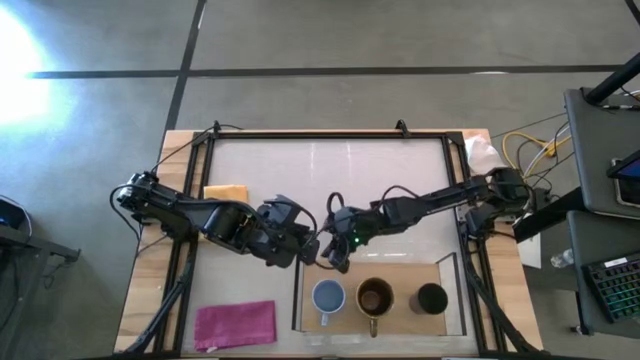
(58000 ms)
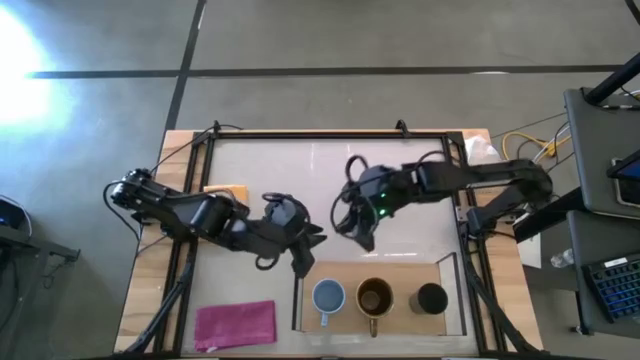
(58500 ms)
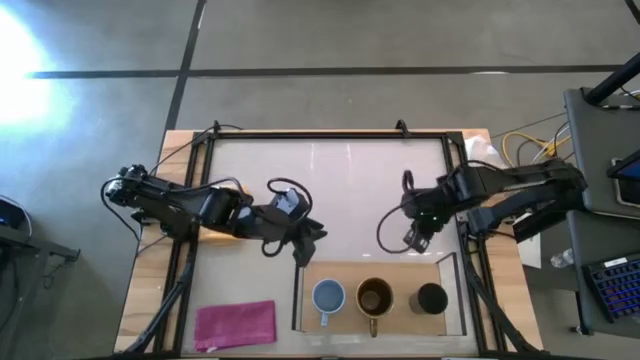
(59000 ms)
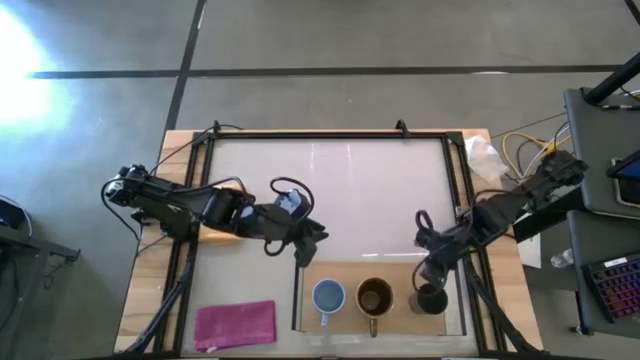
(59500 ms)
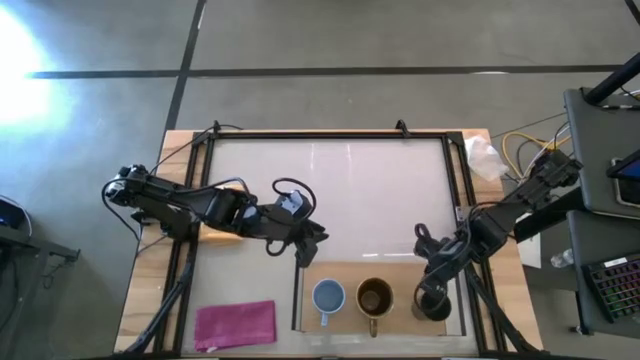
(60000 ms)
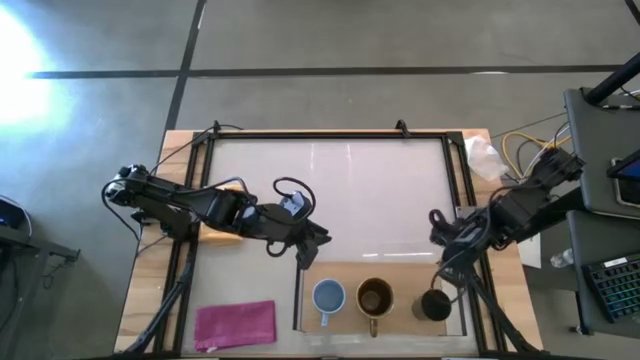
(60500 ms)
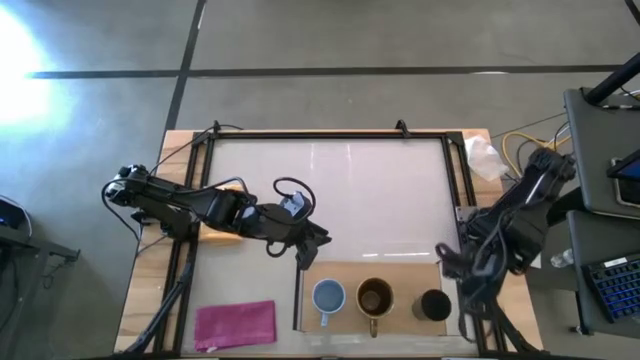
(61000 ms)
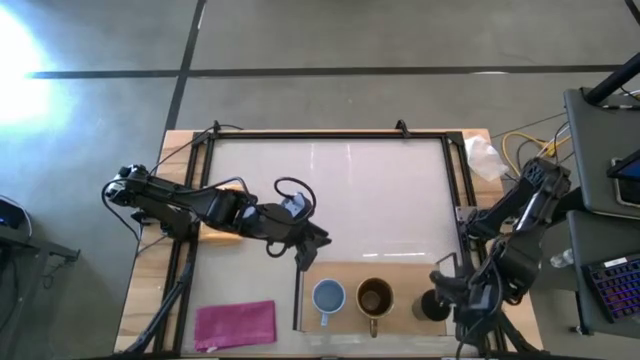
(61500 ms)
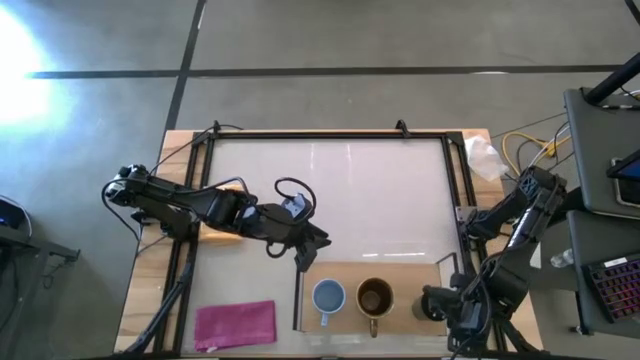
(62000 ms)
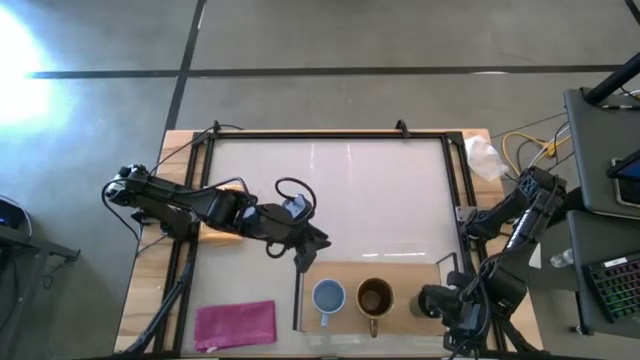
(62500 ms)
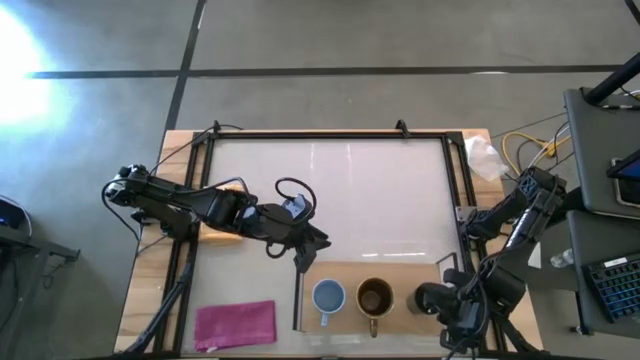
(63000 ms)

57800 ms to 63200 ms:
Task: Stack small to large cups/mugs on shelf
Adjust the black cup on the shelf

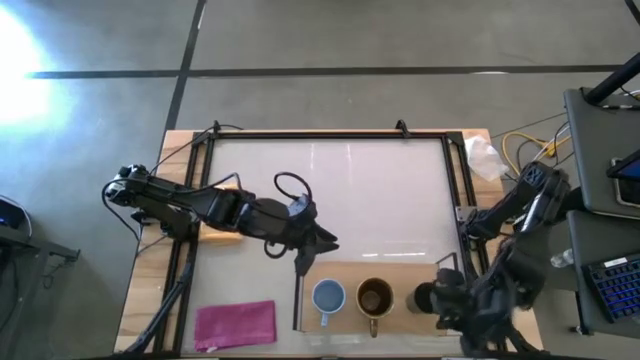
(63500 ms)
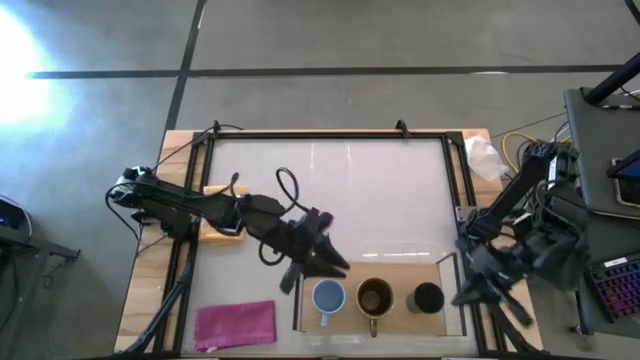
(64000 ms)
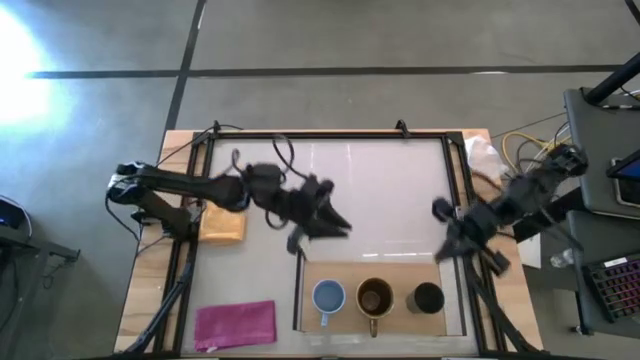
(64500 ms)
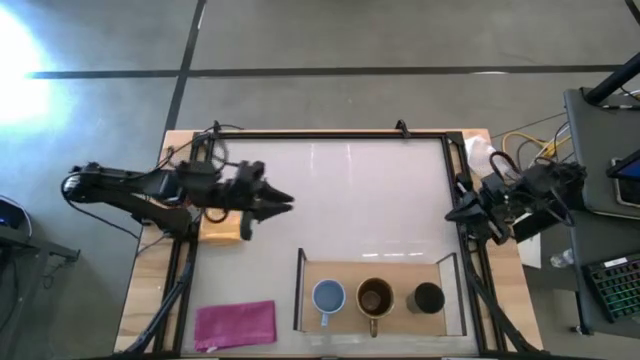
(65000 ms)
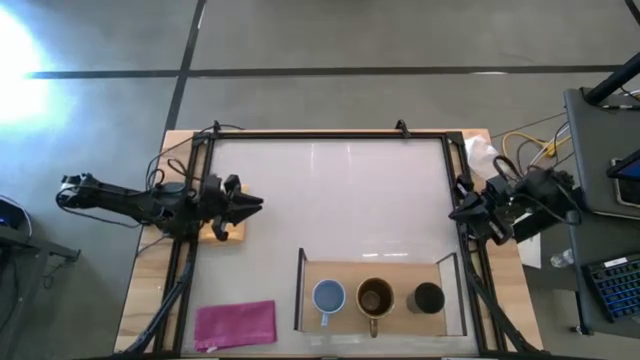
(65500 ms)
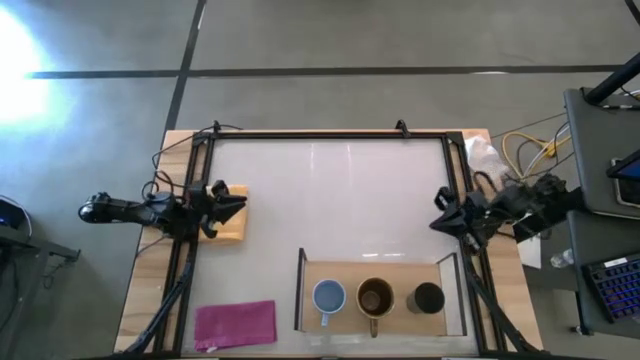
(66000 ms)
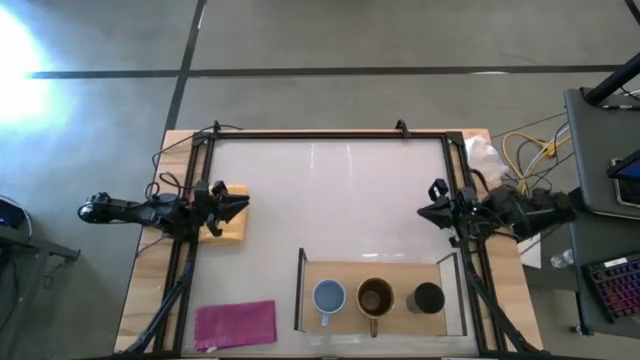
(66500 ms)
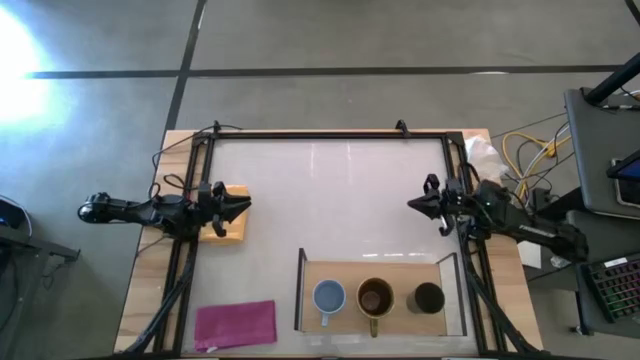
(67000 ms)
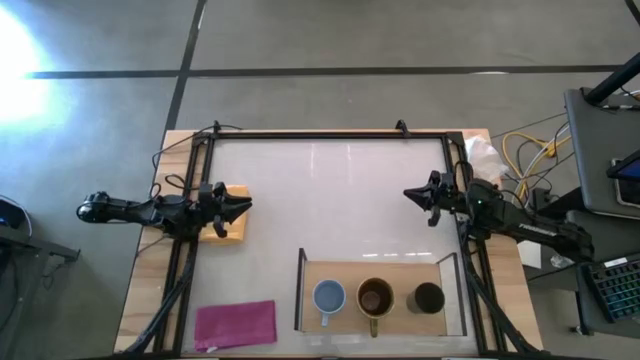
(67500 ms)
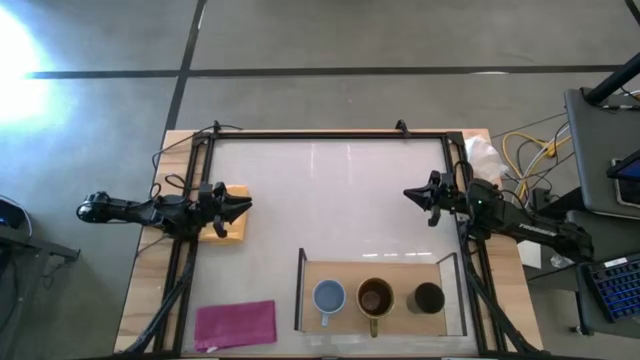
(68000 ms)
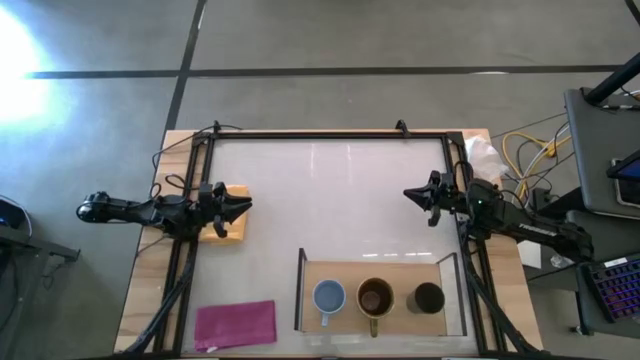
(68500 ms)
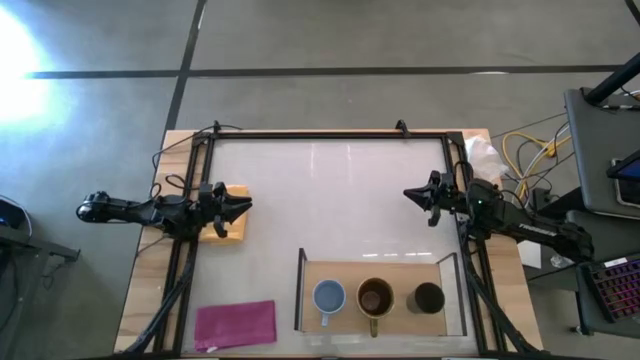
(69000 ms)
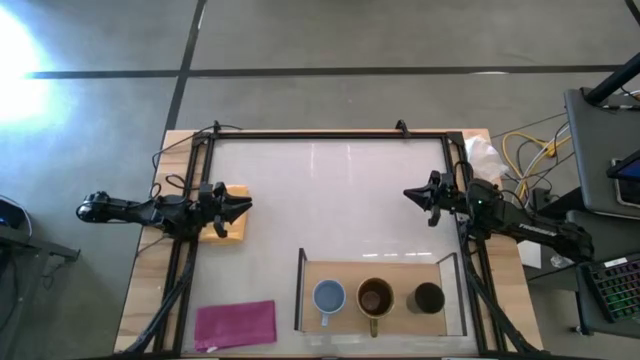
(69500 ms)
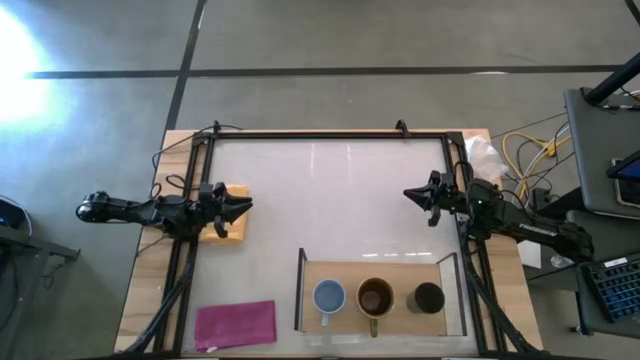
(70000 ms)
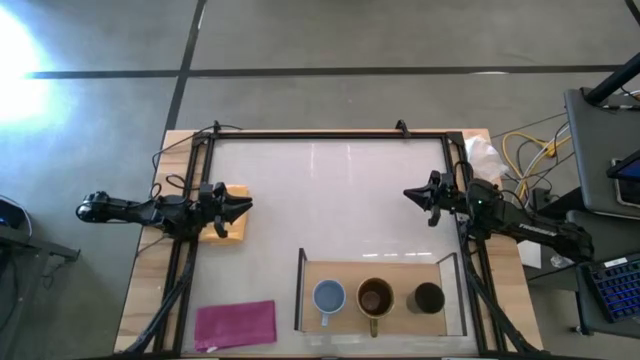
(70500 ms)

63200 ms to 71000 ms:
Return to Home Position

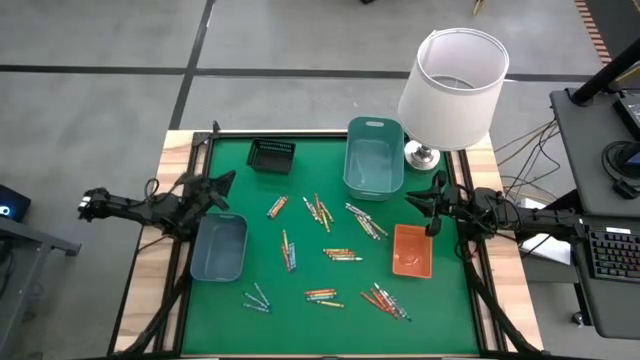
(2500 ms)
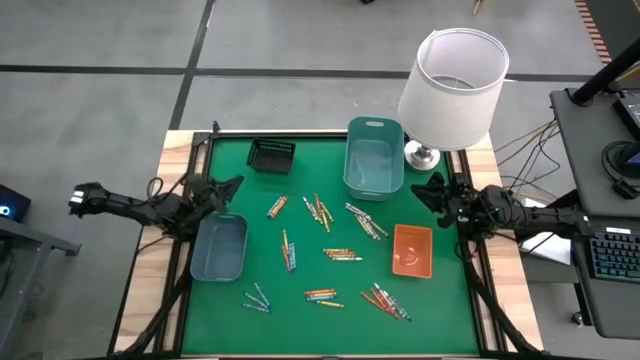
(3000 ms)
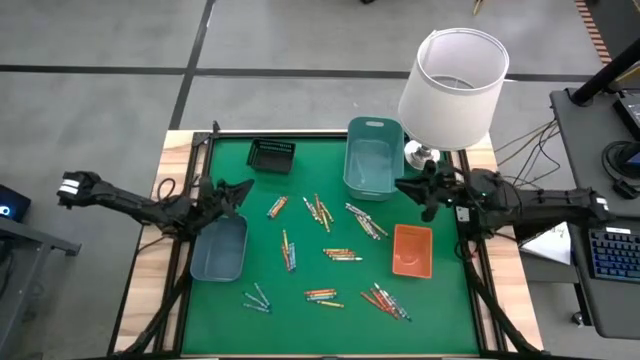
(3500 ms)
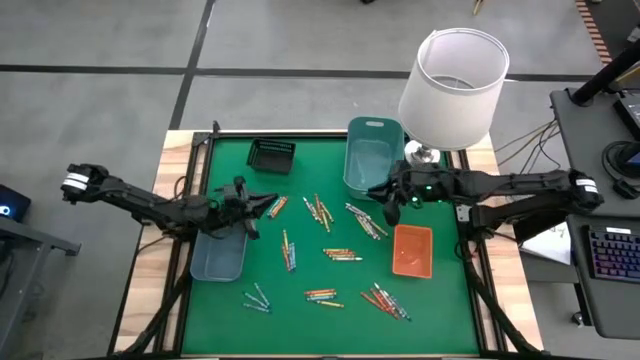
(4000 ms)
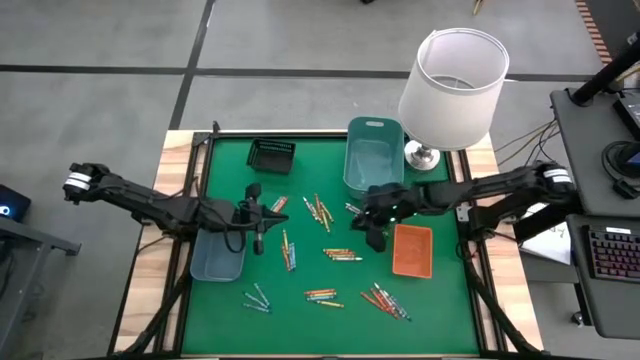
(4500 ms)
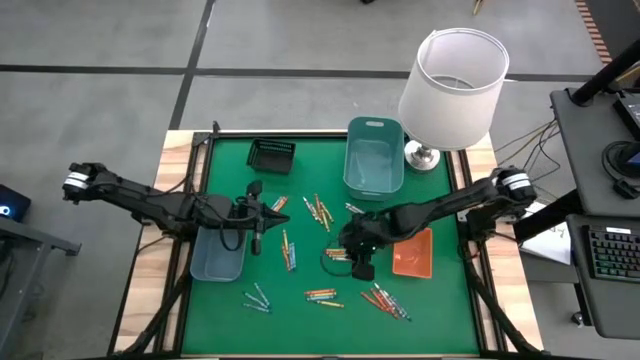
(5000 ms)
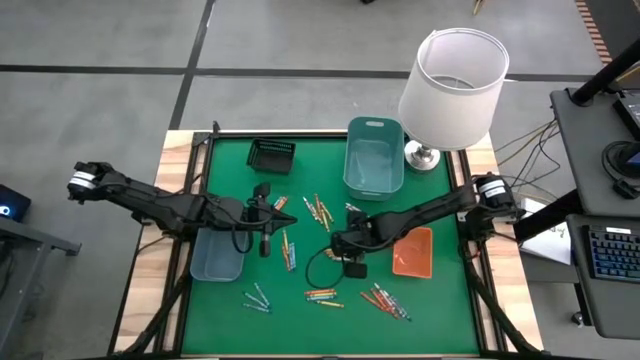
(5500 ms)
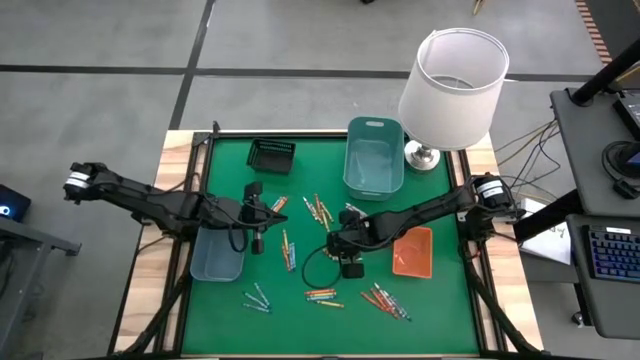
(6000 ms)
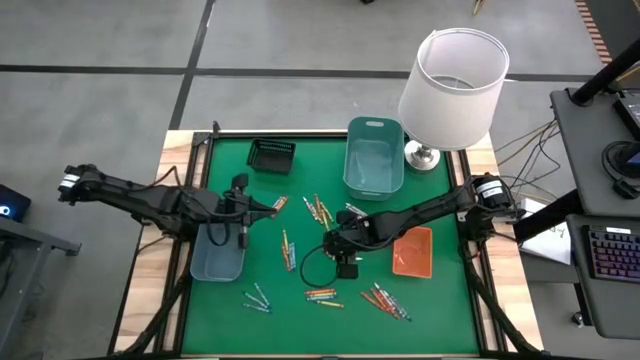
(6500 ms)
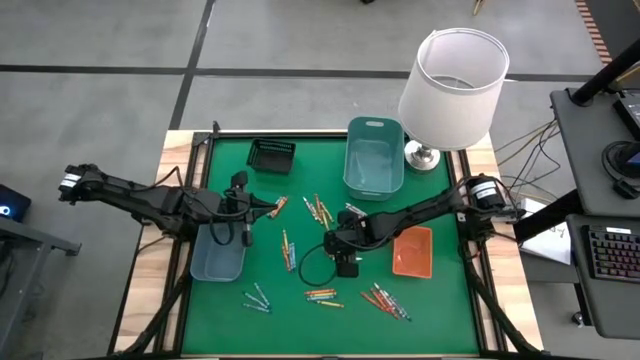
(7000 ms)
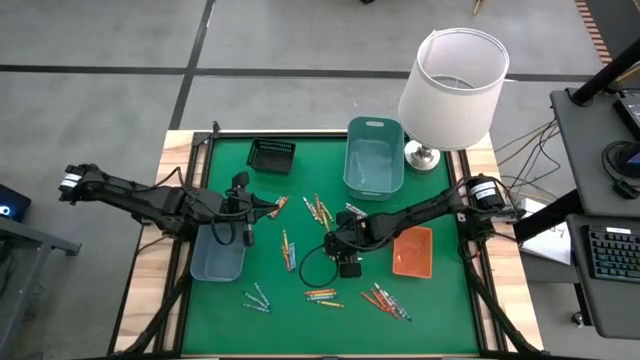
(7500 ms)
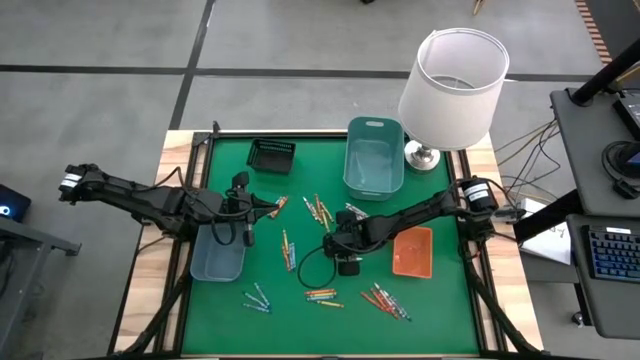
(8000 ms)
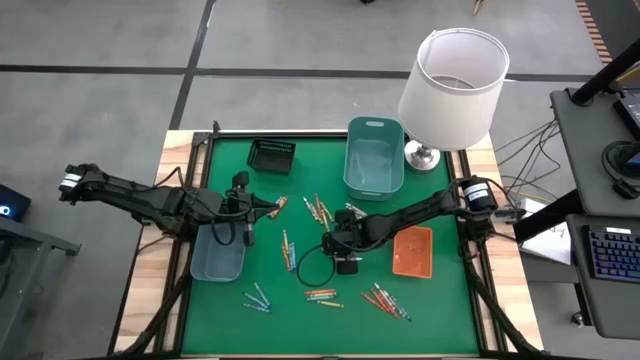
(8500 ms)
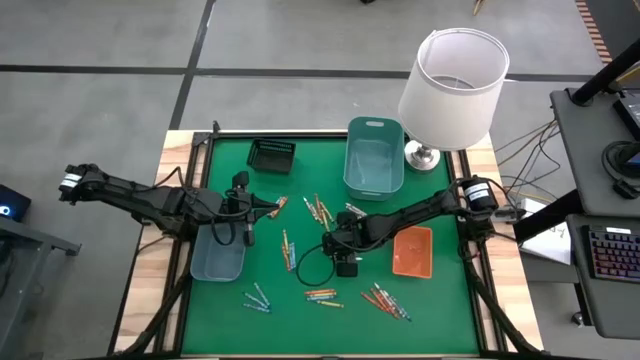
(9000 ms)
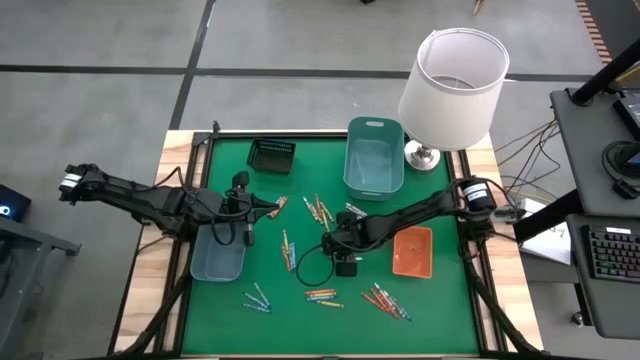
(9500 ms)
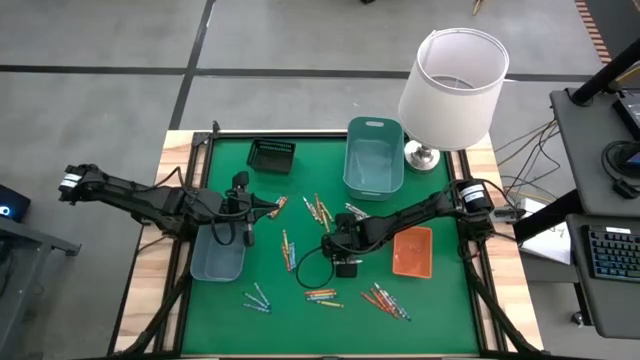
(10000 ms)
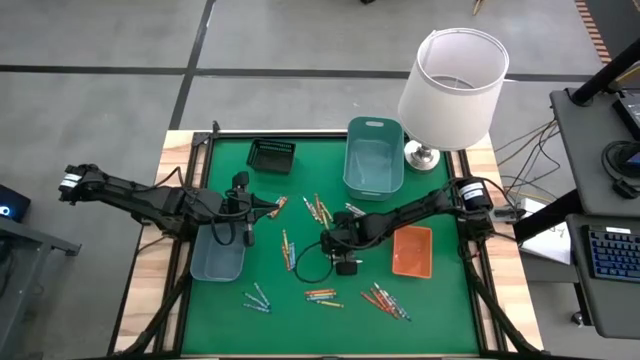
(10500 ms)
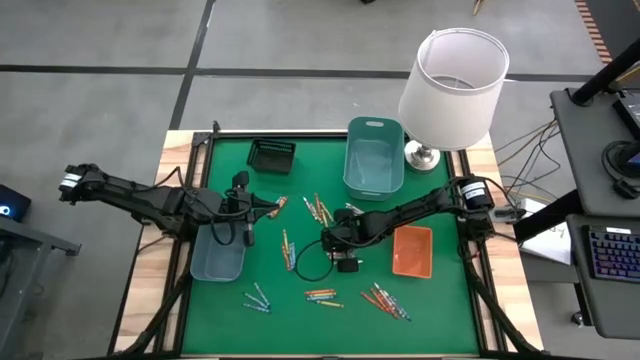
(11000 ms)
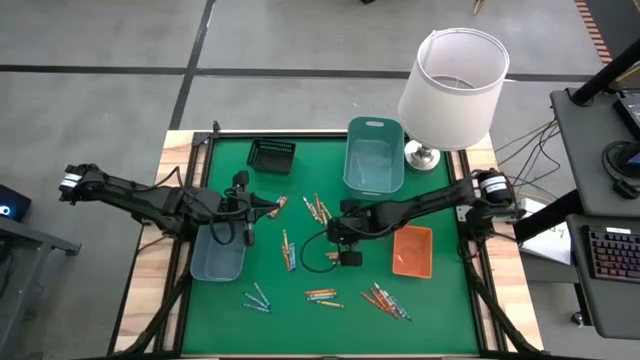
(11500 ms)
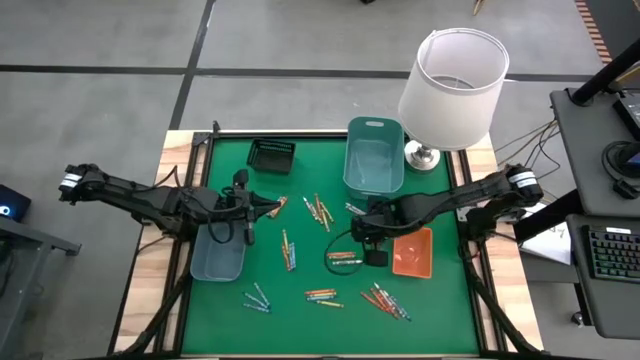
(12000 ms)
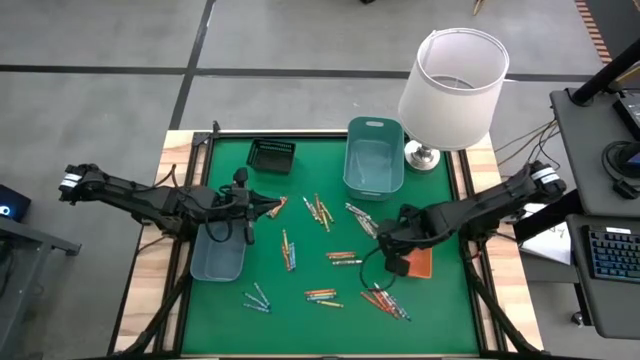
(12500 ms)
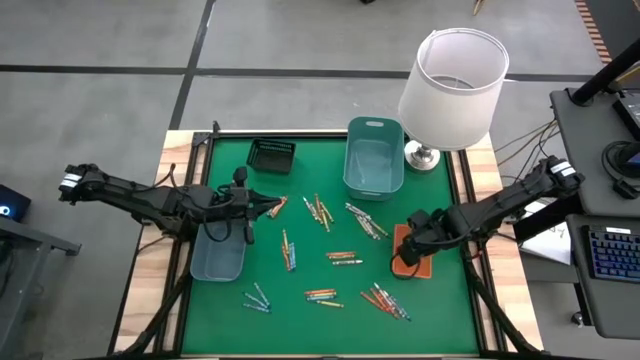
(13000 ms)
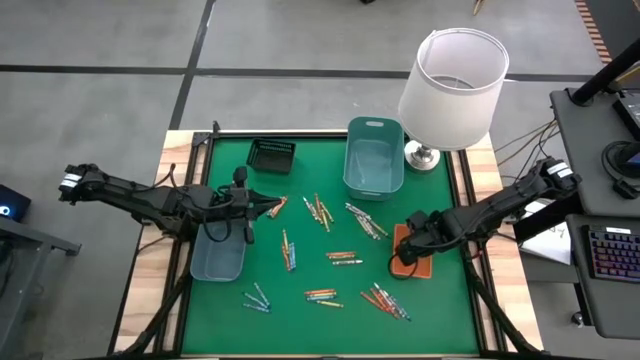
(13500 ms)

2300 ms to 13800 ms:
Task: Sort crayons
Put the green crayon into the orange bin
